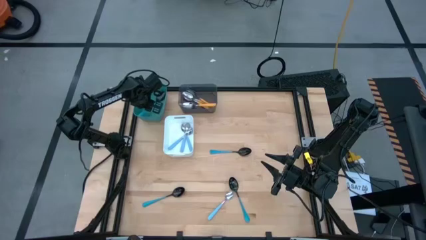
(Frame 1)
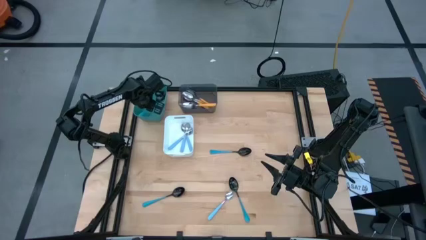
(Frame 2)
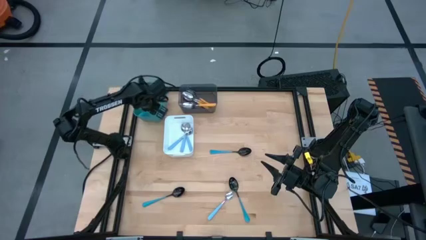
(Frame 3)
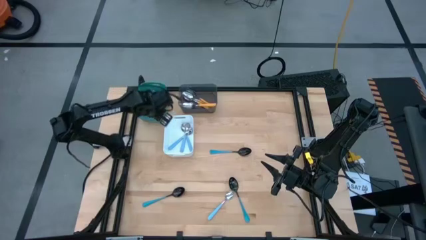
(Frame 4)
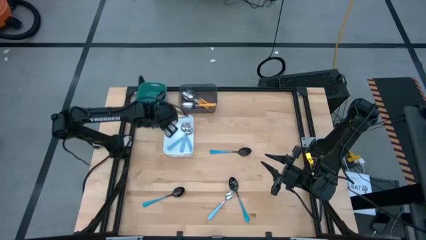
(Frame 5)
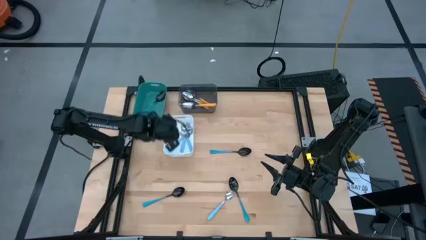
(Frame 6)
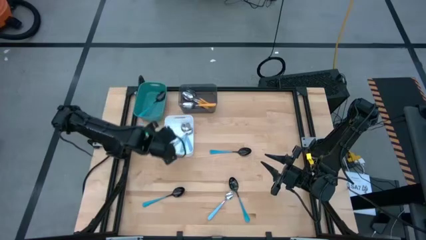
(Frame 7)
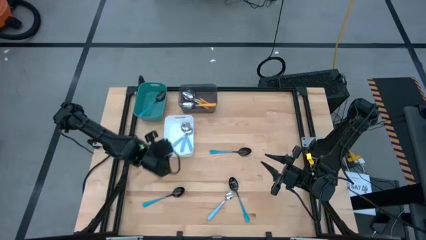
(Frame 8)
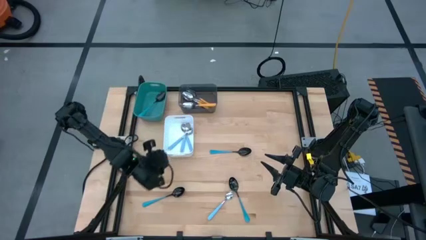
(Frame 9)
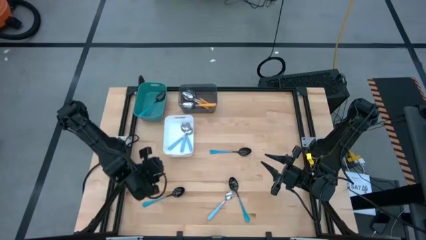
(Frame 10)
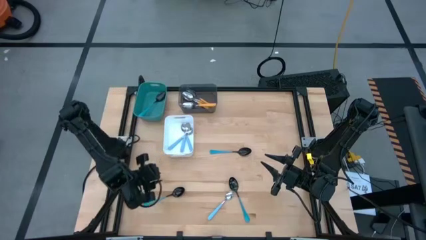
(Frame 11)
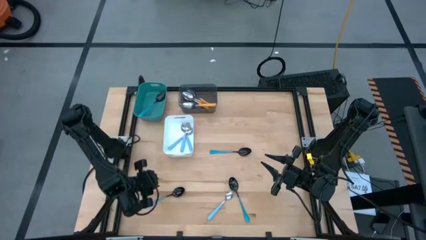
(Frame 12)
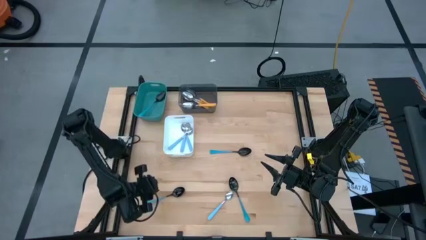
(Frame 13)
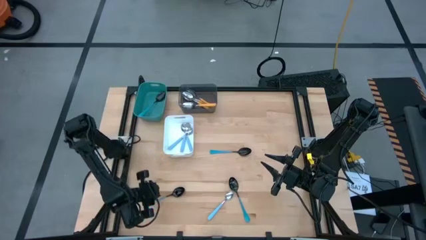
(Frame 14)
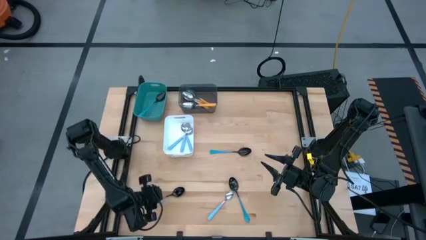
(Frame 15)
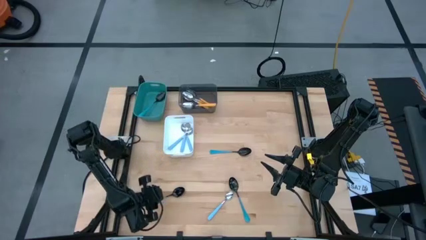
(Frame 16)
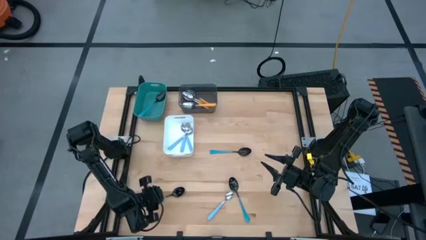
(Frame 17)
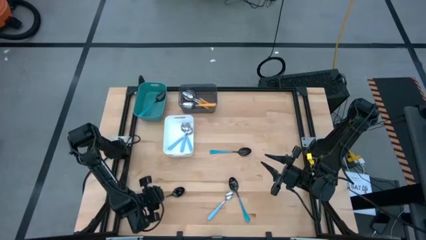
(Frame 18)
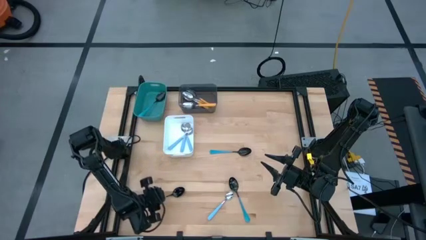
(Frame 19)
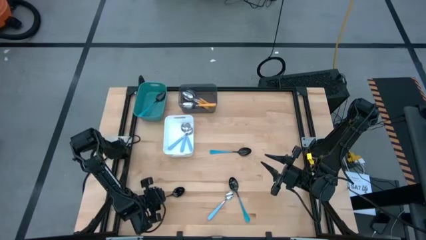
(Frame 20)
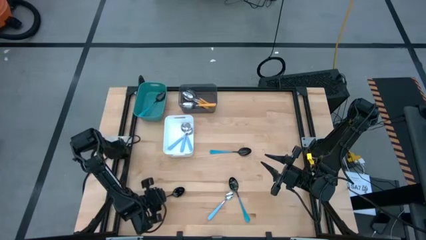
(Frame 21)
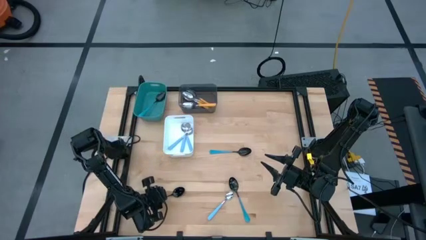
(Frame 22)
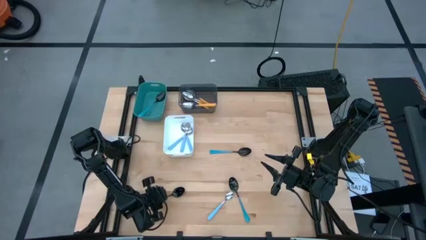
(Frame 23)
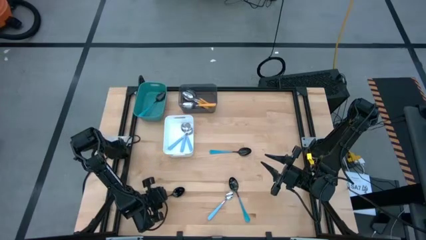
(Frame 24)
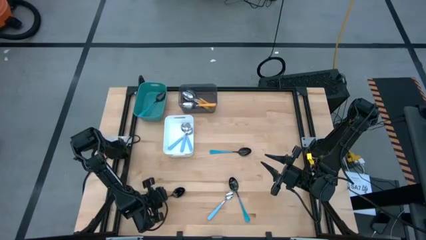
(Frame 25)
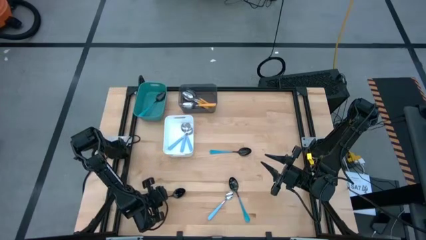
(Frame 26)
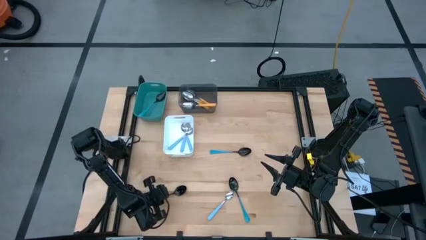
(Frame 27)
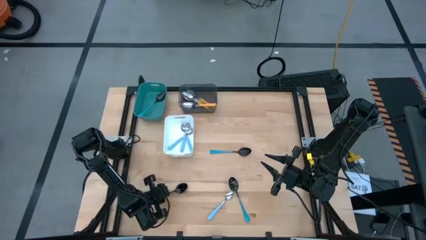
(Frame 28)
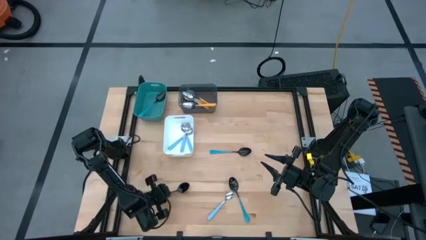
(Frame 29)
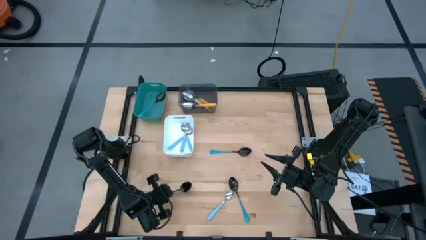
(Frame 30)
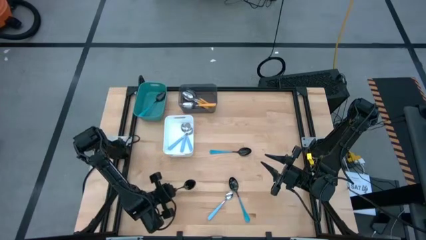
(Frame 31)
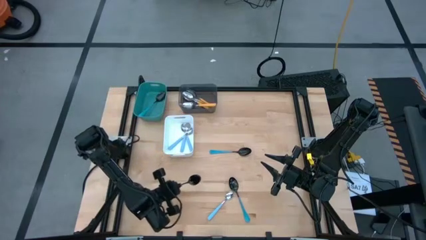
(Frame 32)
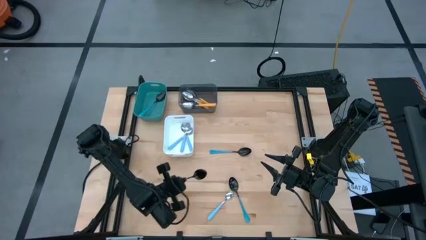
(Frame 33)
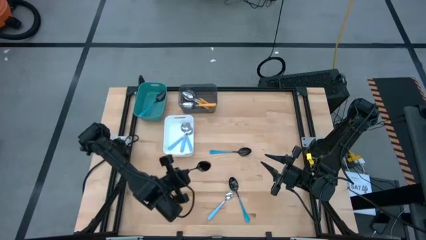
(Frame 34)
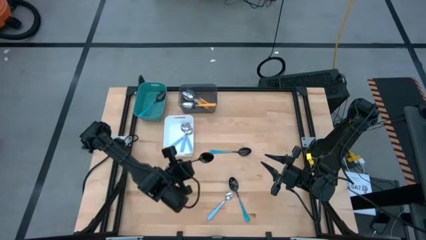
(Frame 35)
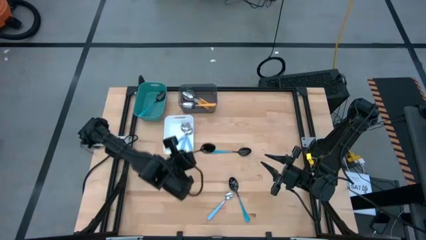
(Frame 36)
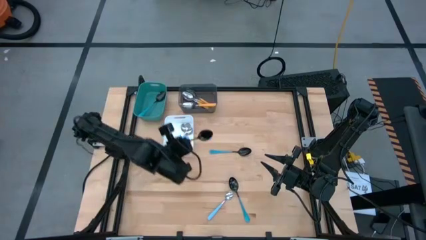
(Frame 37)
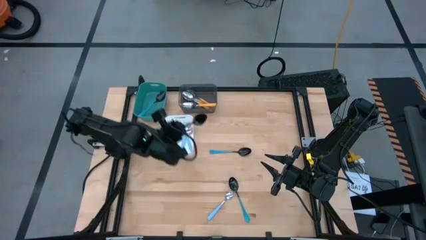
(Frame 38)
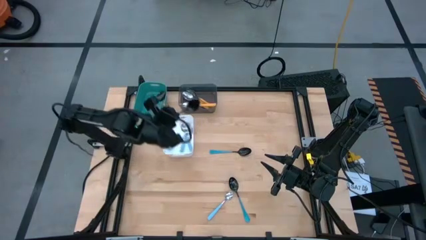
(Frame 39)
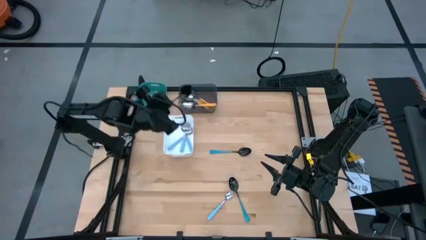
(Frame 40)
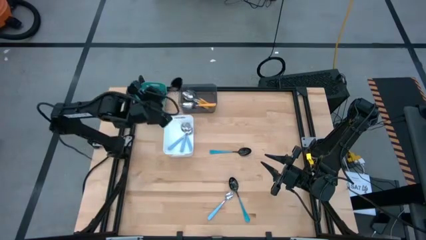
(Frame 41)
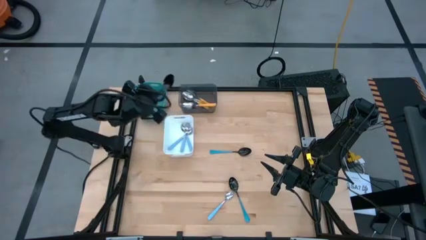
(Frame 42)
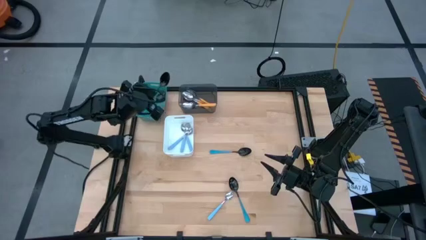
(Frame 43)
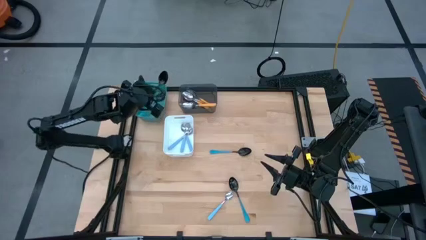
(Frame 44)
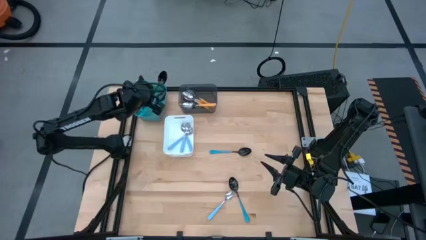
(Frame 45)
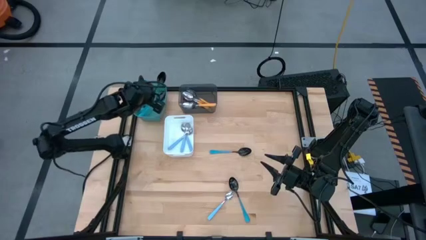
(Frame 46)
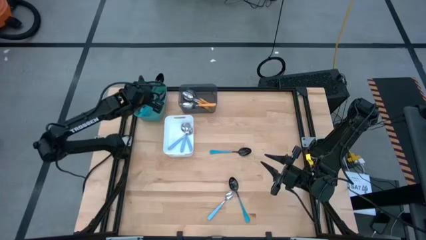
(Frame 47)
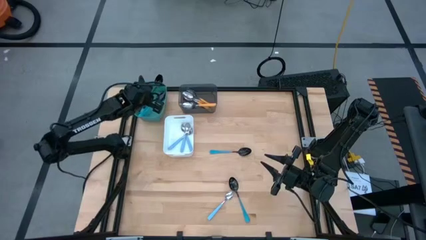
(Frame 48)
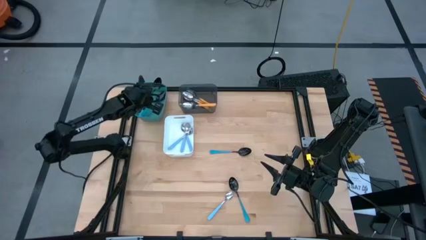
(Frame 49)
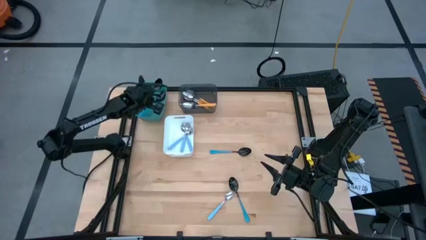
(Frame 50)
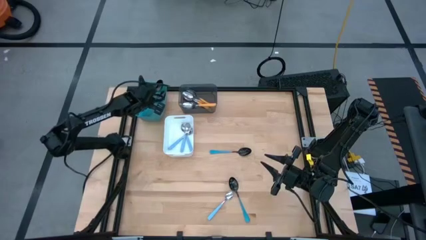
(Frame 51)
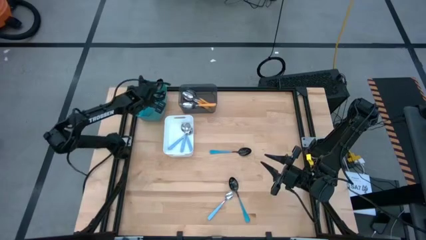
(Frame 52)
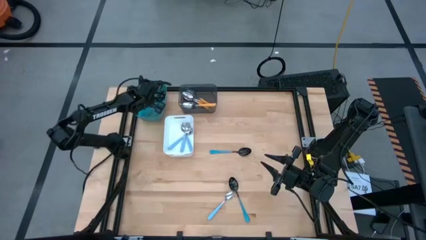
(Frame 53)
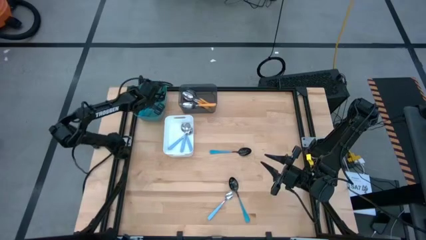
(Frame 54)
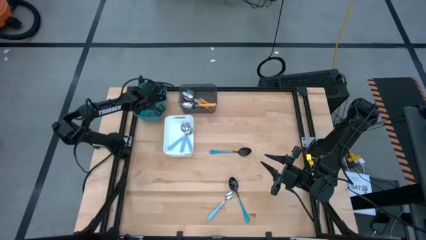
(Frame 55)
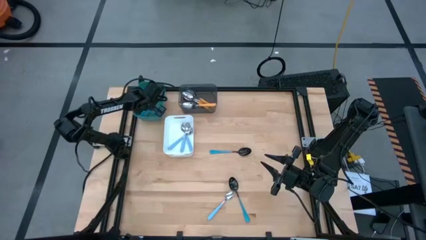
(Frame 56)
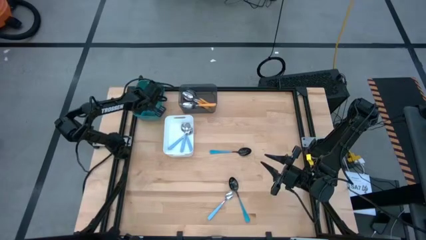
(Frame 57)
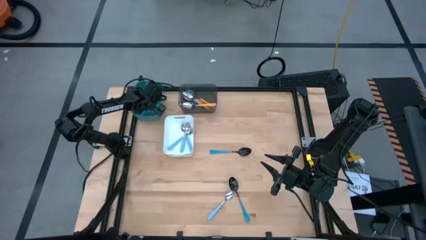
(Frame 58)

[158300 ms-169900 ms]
Task: Sort silverware by color (type)
Put the bottom left blue spoon into the green bin

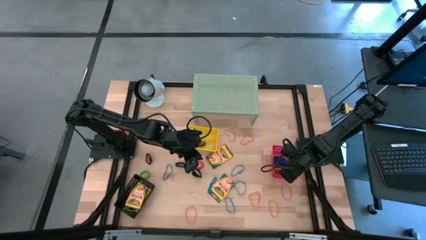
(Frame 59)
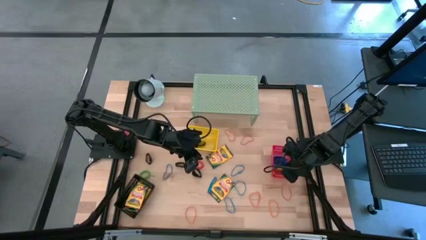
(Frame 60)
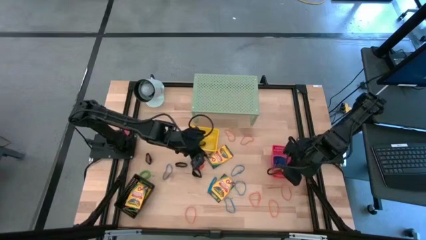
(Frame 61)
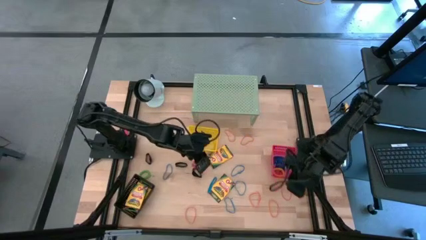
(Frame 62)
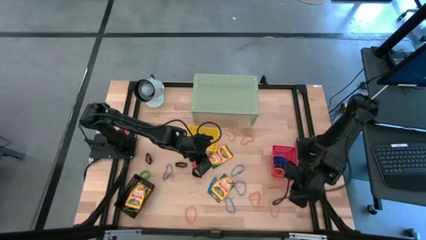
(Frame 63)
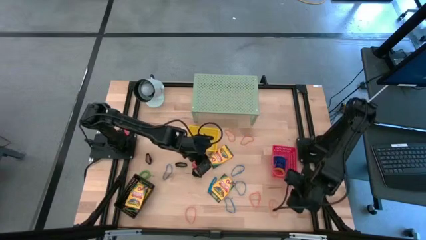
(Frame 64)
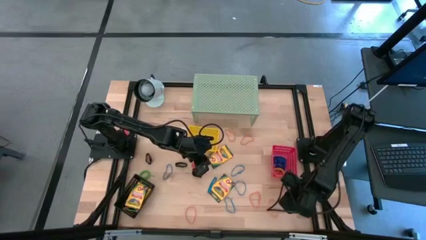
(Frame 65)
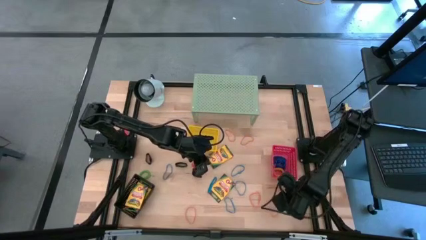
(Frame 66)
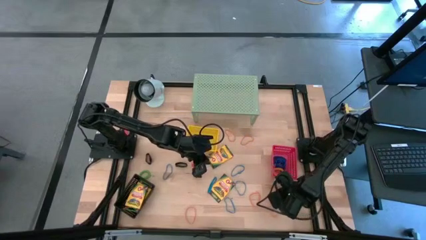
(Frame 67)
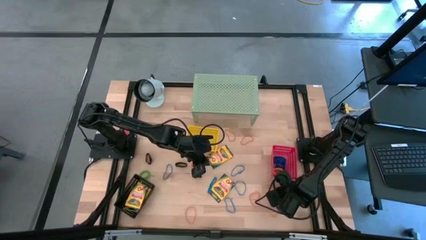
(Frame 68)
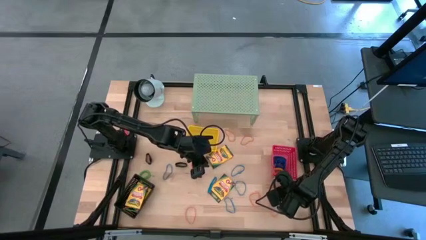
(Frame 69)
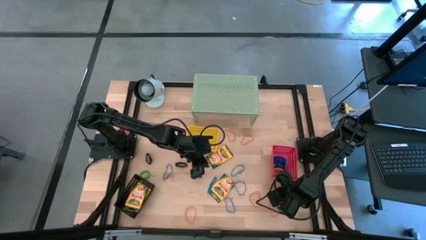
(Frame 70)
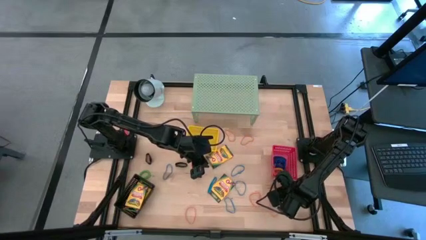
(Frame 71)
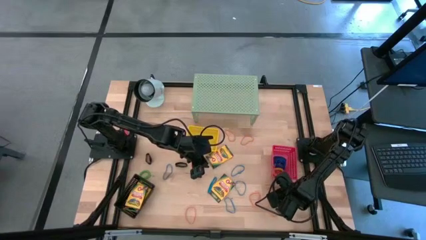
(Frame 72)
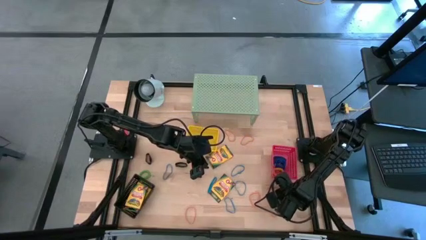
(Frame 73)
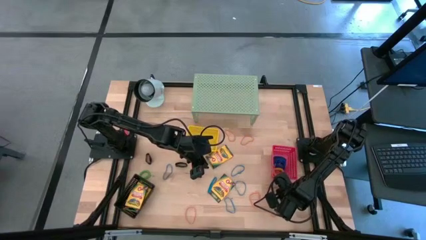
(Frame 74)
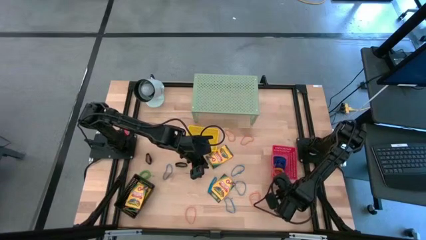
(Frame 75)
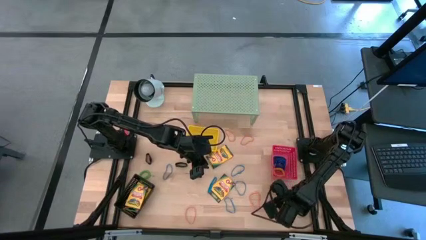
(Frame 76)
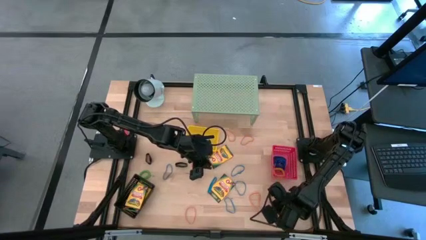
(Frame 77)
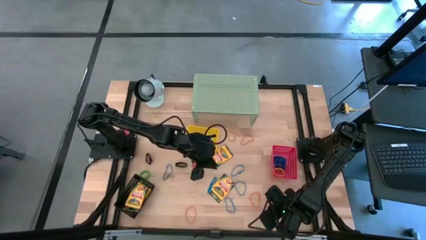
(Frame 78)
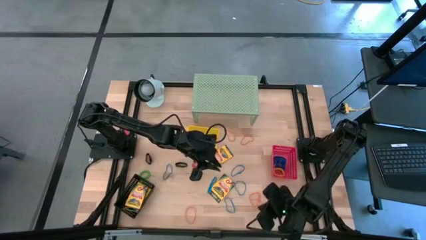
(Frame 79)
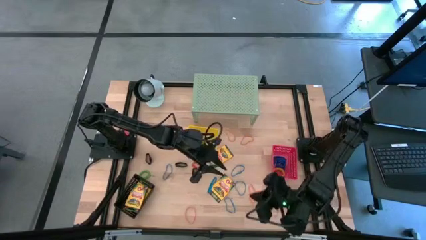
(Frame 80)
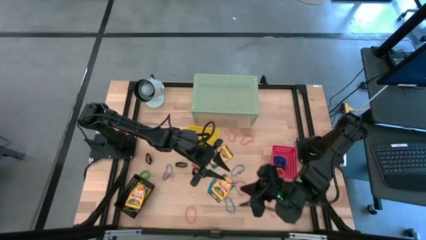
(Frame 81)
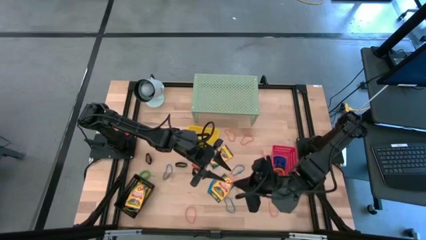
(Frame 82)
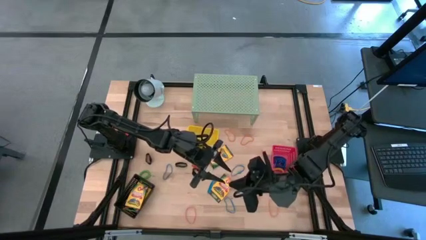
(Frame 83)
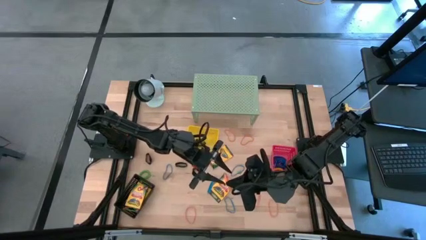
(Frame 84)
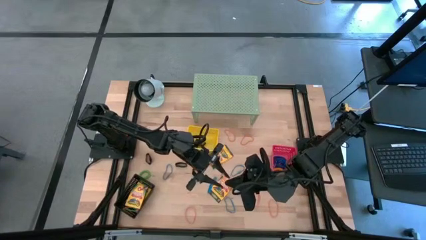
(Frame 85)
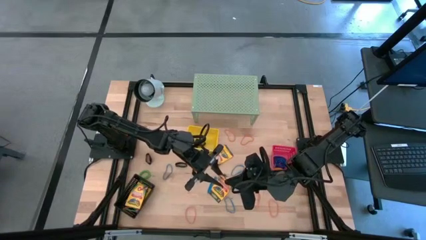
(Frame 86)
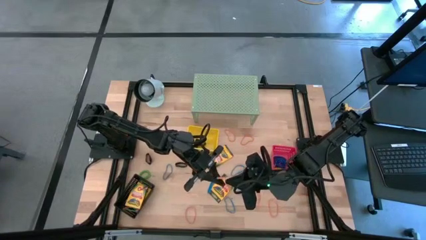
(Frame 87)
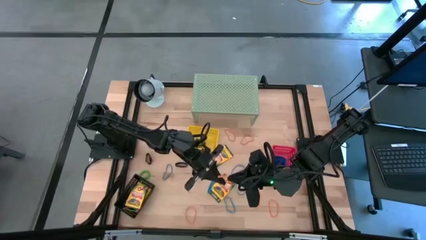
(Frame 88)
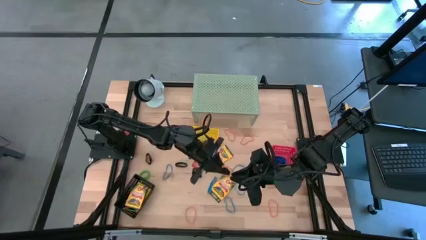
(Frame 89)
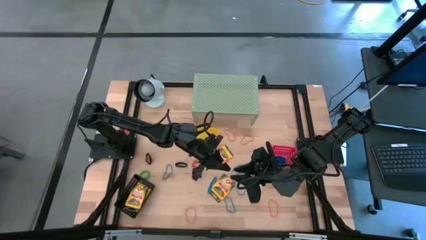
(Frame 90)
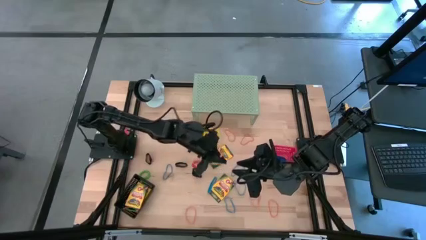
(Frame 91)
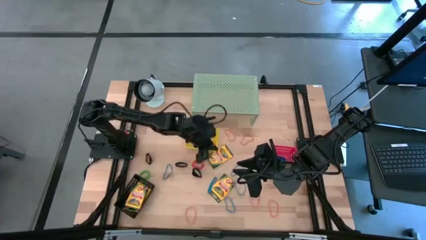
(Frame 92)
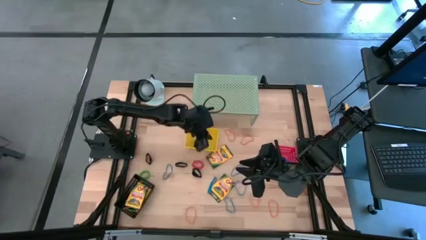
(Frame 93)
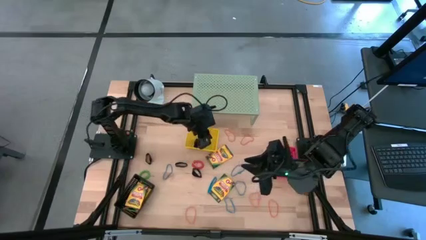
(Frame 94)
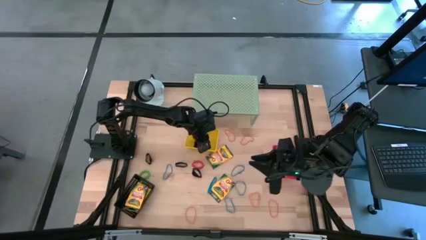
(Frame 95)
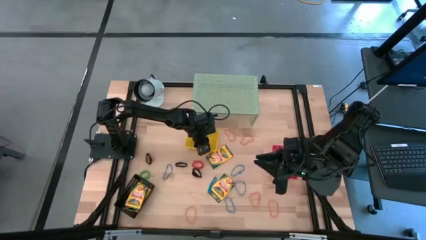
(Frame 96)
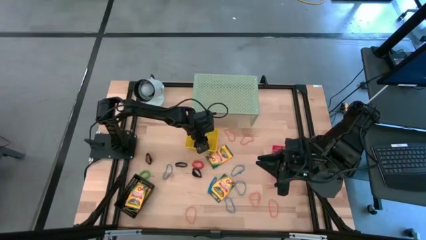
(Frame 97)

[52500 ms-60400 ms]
Task: Pick & Place Office Desk Supplies
Put the orange rubber band into the yellow bin
